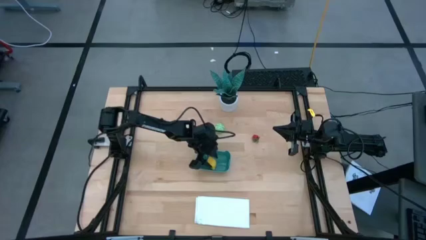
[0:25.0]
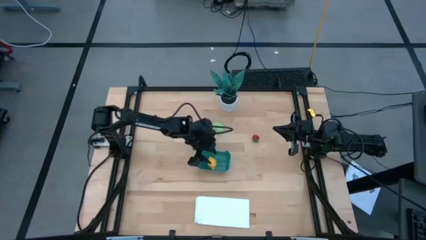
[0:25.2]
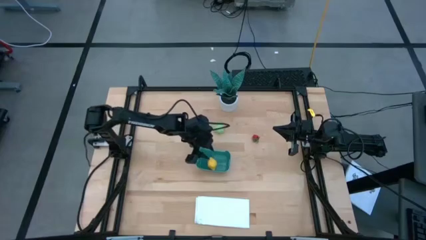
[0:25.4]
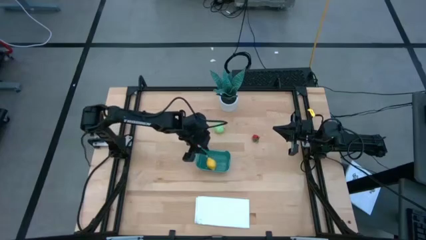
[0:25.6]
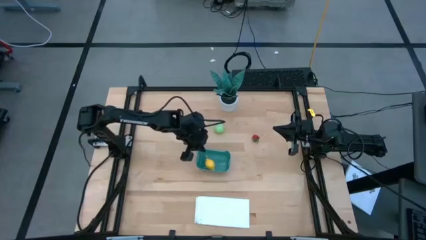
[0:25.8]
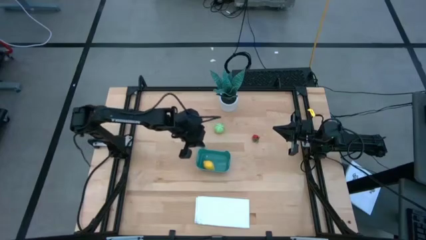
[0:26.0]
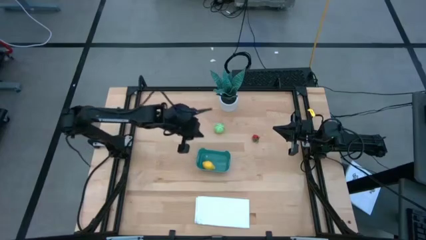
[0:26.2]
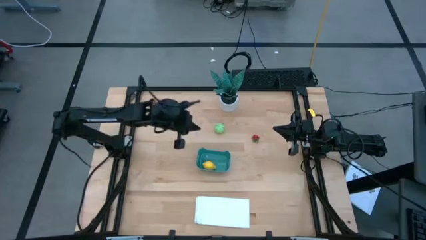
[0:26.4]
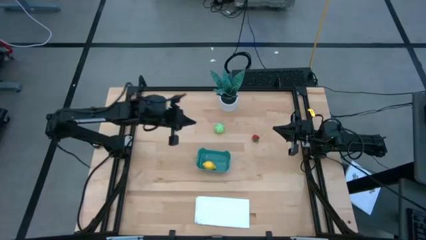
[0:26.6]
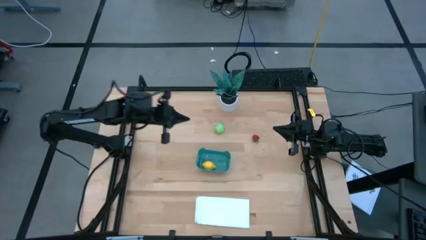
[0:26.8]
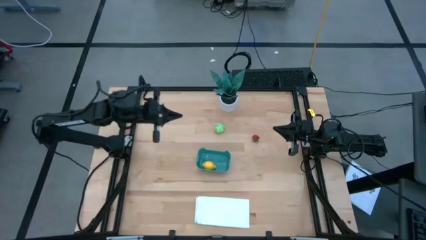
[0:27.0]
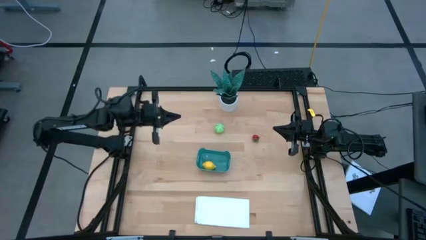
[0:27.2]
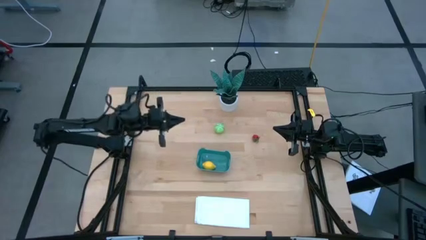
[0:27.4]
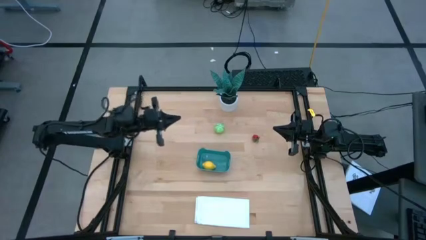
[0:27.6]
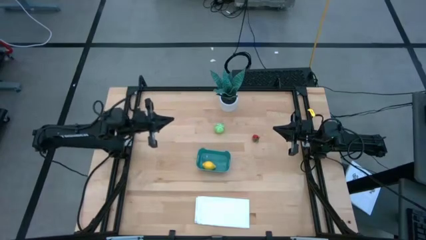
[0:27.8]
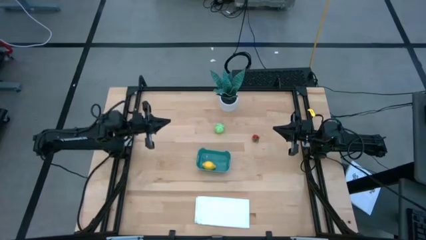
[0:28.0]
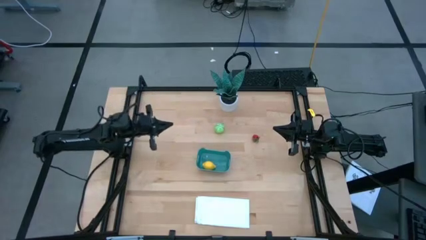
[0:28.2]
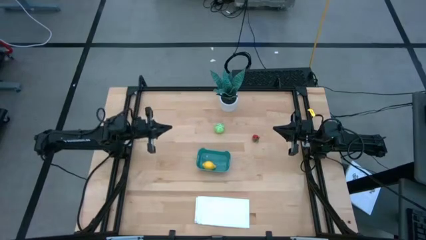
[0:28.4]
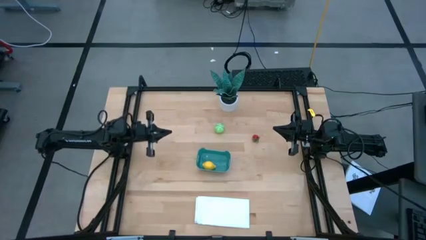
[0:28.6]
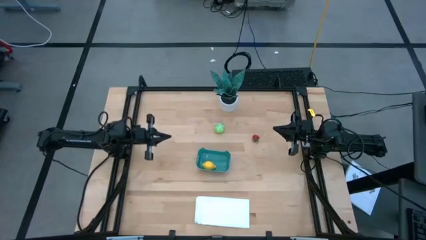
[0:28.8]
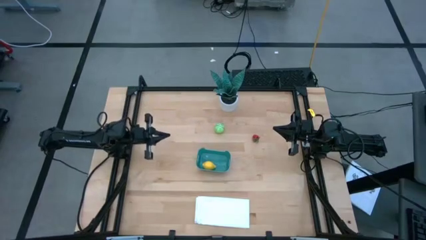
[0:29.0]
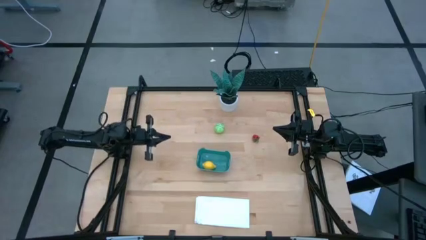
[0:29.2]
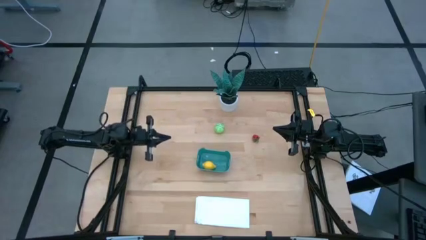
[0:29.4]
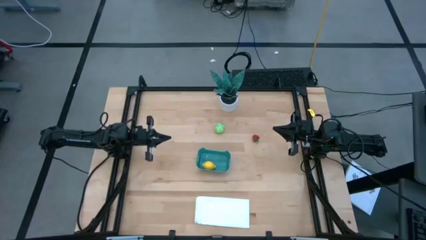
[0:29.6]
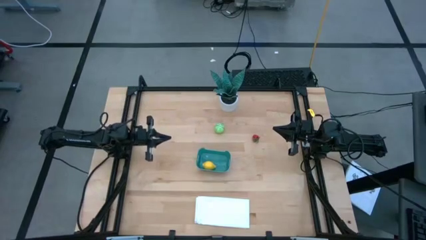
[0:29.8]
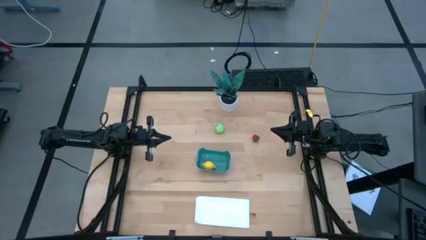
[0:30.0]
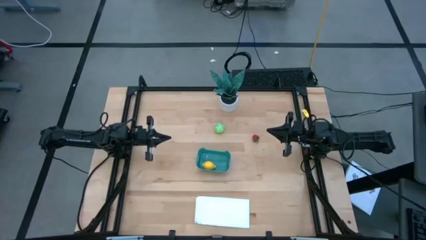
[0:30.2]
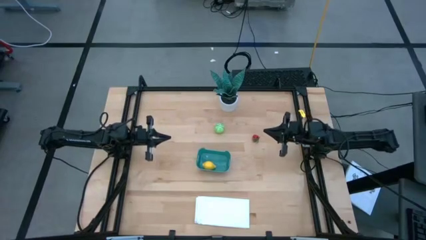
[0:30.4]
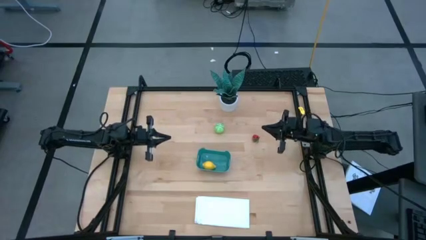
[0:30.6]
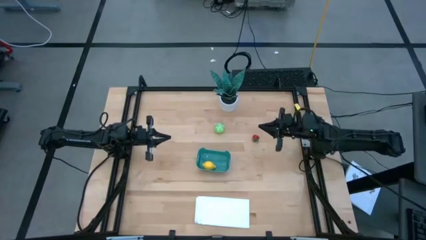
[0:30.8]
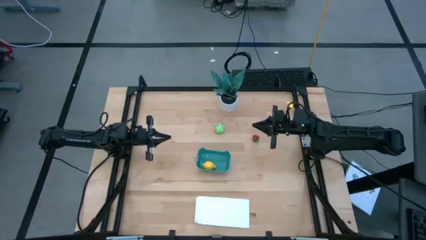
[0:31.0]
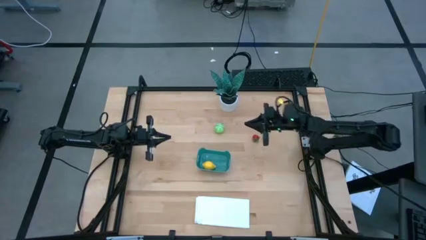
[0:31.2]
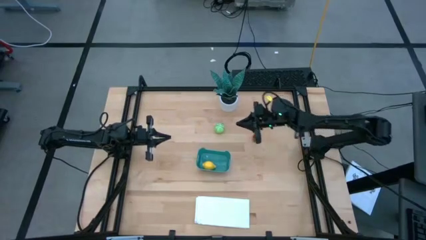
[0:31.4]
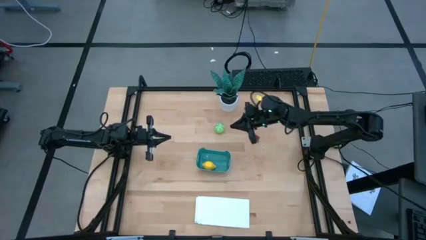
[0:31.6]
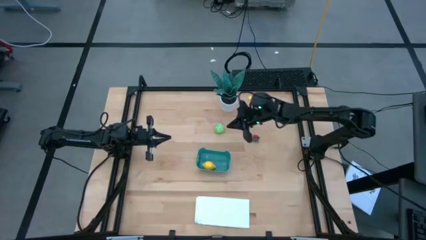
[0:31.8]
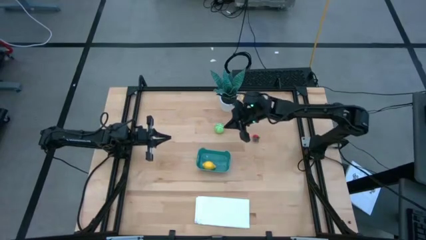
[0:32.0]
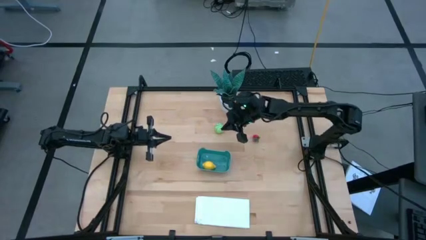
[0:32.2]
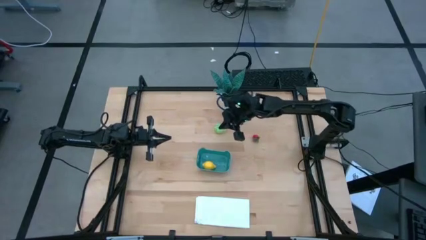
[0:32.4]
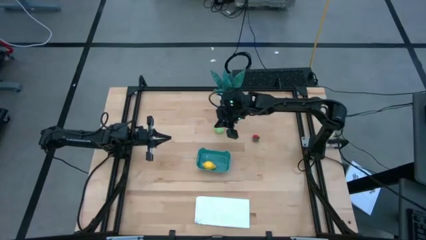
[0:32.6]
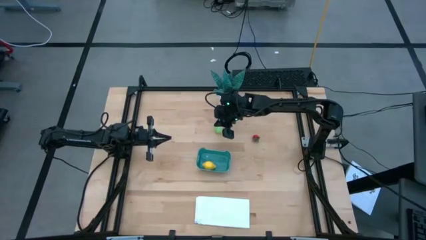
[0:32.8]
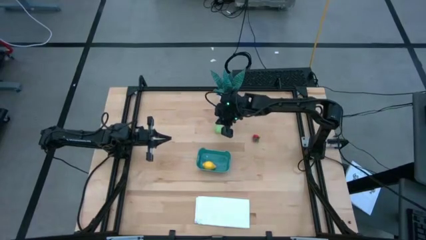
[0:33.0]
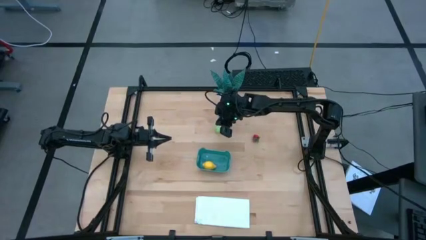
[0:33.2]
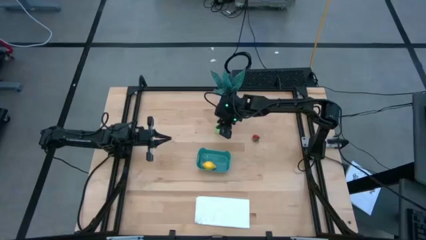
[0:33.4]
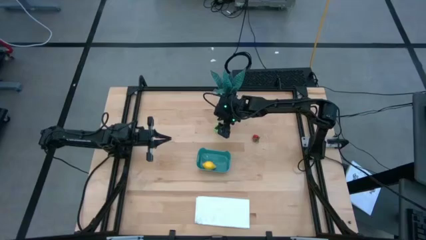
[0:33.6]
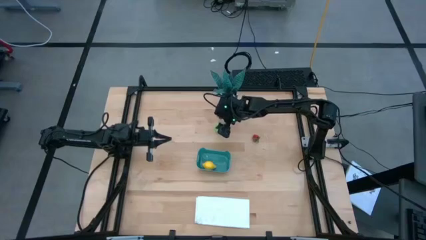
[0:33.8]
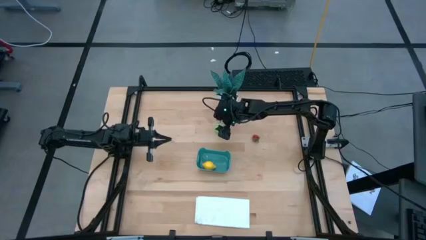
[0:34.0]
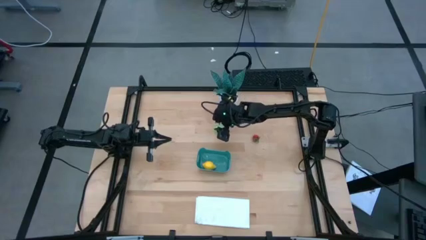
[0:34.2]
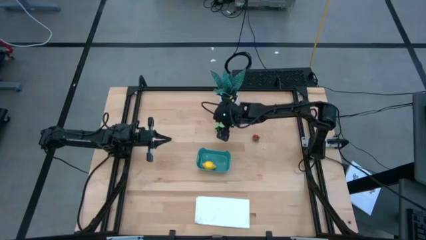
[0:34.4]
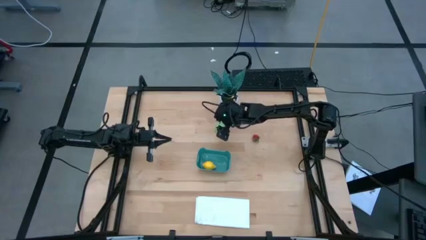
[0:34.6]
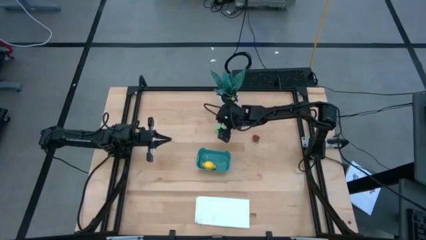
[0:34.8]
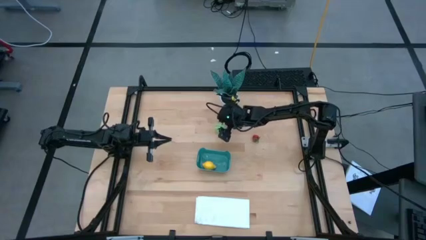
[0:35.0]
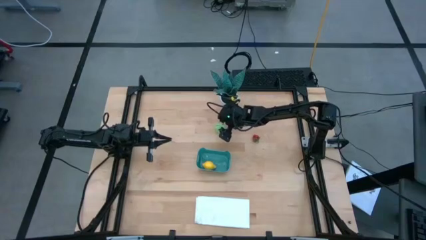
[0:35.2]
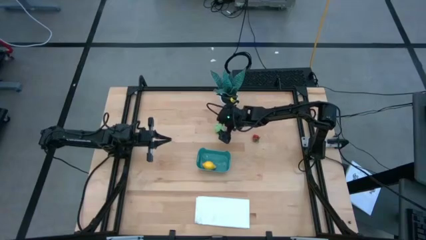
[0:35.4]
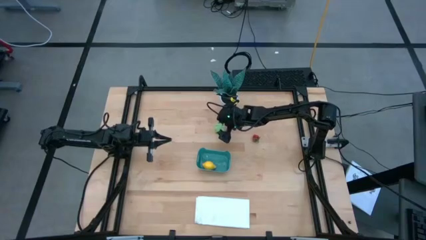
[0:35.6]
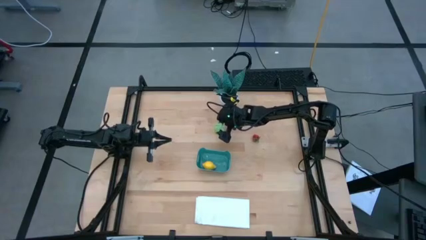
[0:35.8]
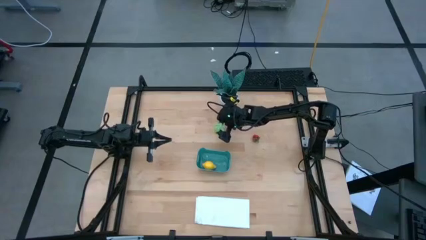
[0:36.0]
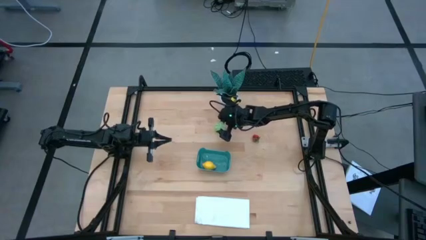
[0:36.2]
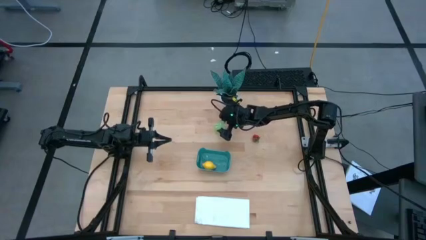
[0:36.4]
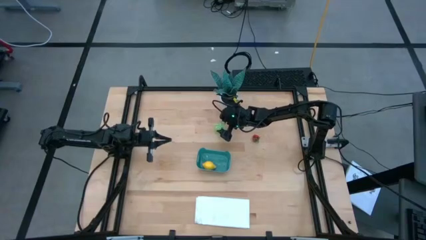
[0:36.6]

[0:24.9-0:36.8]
Task: Pick and placing Produce into tupperware
Put the green cabbage into the blue basket

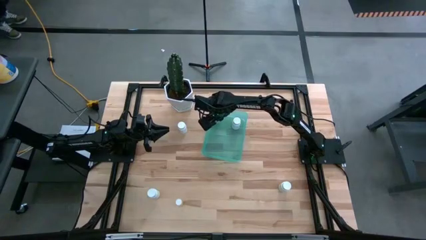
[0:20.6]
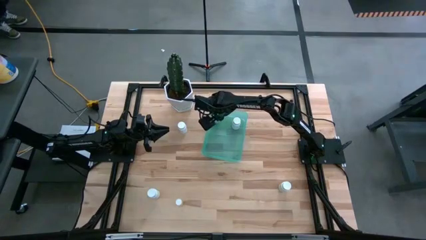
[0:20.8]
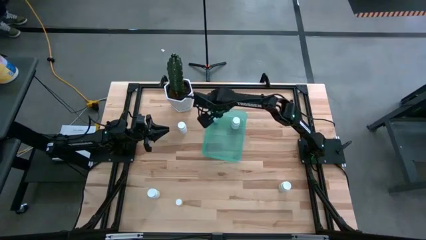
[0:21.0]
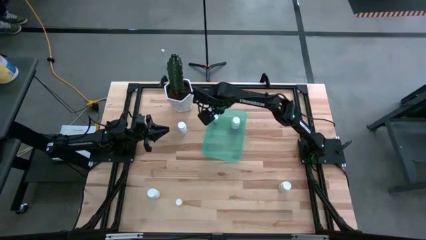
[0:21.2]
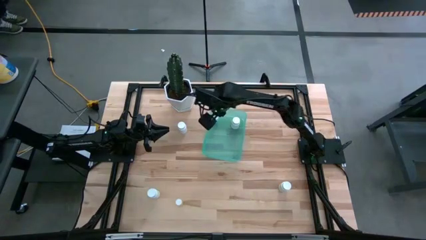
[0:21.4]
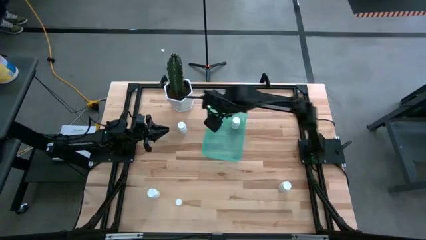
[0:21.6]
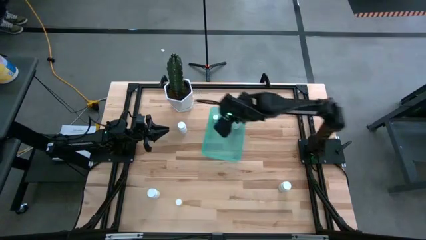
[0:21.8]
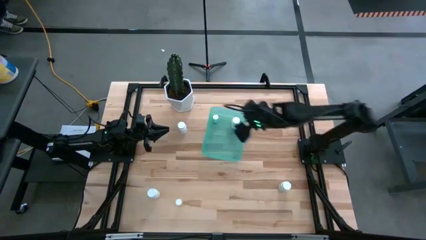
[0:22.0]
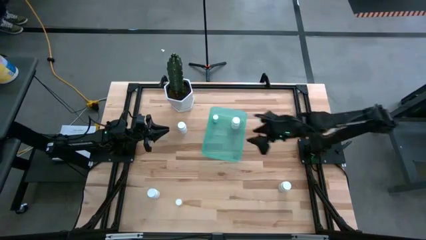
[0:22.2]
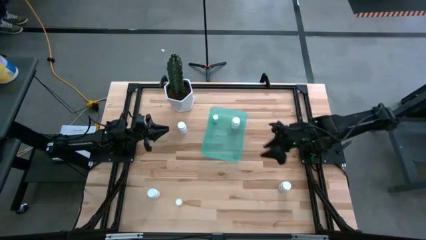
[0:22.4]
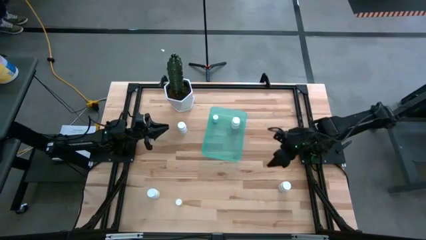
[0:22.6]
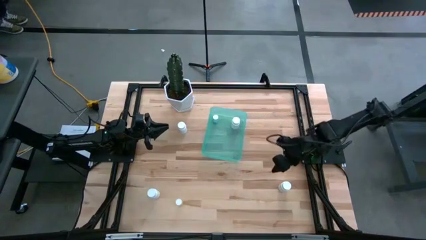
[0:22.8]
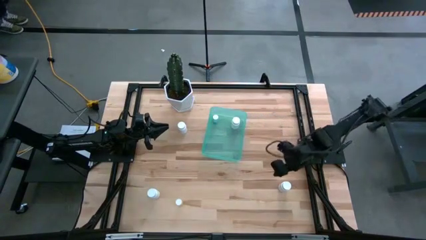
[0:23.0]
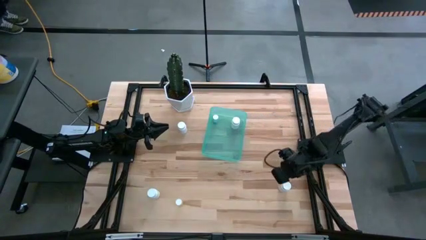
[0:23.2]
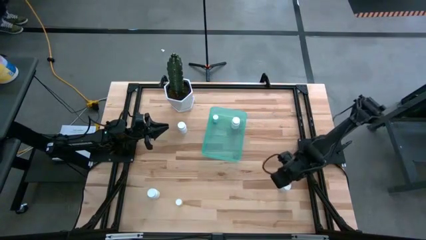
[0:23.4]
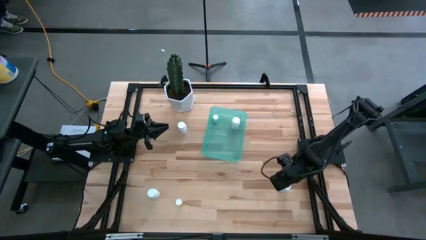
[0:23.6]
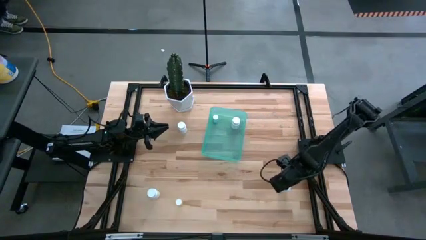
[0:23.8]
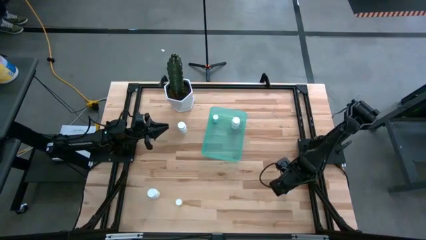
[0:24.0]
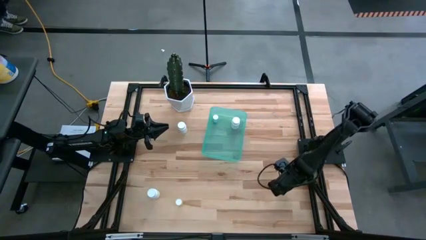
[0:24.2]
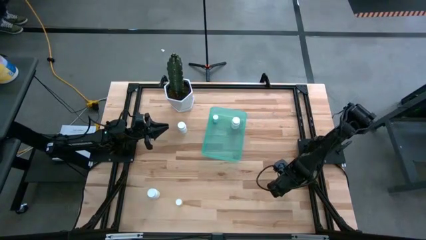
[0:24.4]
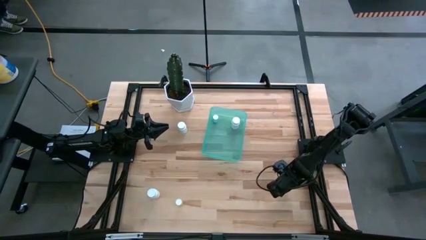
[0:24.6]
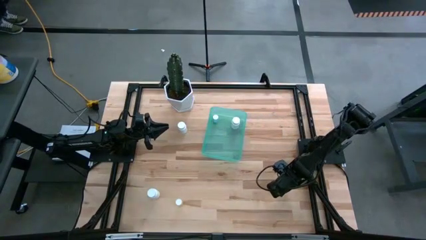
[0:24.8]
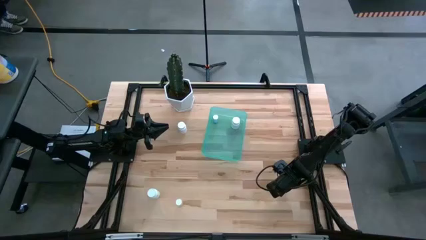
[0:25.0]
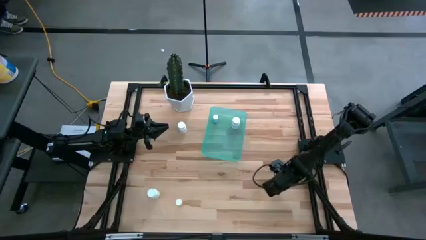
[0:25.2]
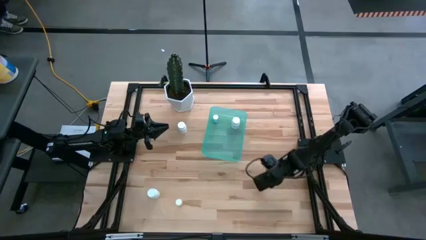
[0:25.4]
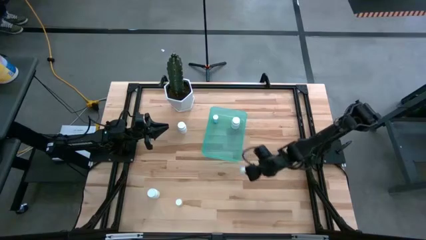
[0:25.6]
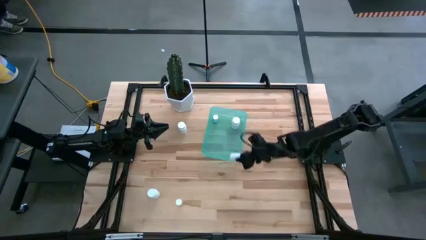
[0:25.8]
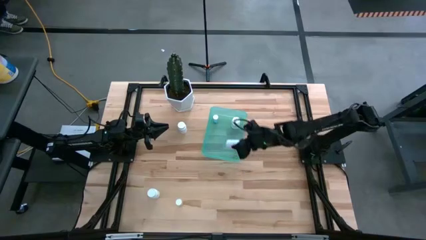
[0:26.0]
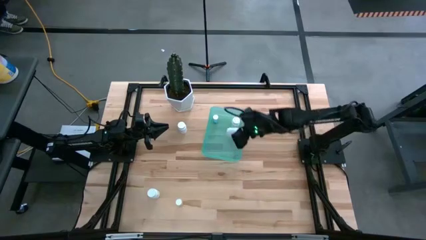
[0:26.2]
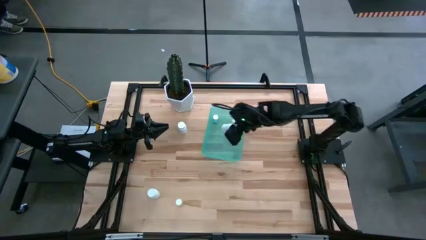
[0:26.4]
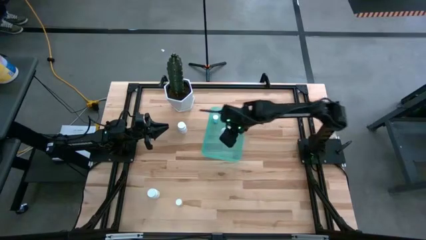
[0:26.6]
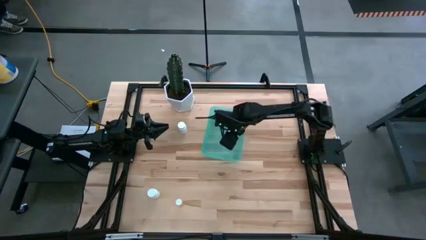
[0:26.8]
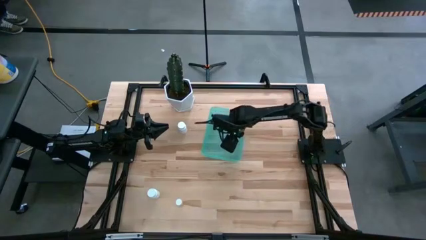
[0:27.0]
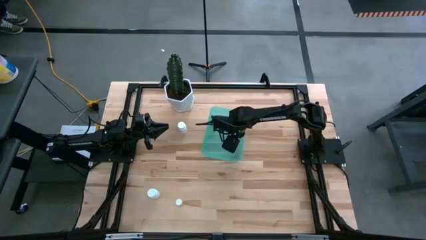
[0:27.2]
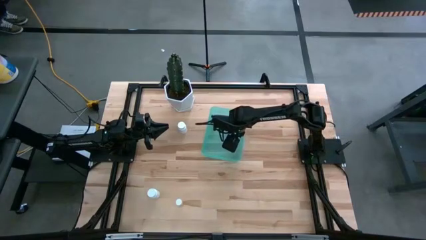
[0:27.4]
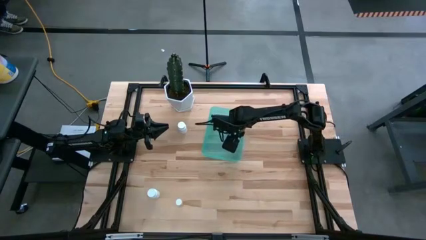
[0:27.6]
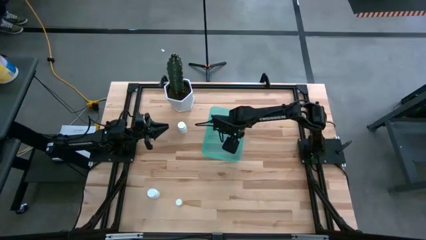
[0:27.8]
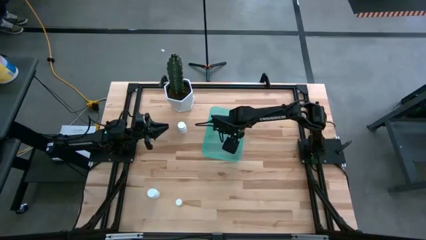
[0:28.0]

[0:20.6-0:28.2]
Task: Pick and place pill bottles into a basket
Put the bottom right white pill bottle into the blue bin
